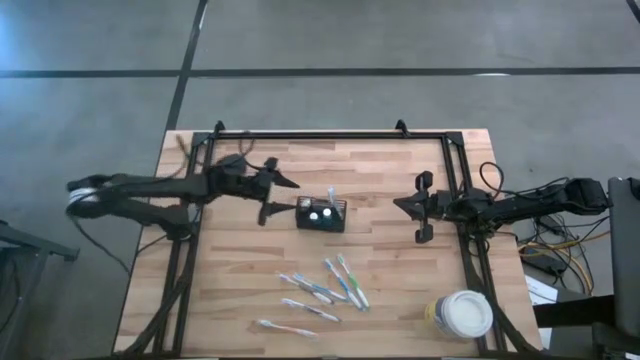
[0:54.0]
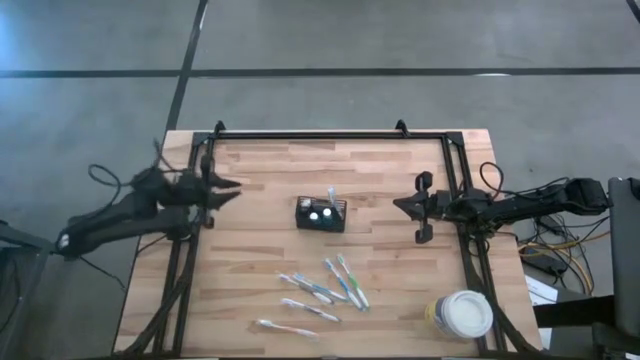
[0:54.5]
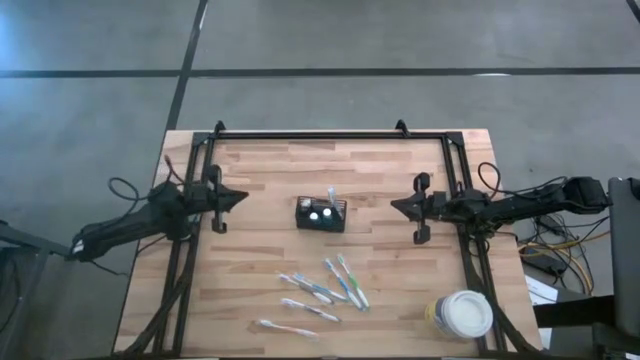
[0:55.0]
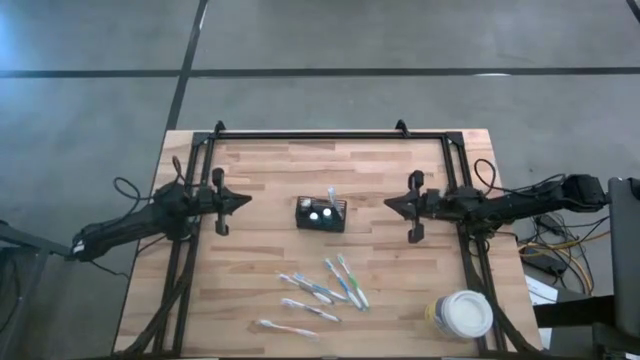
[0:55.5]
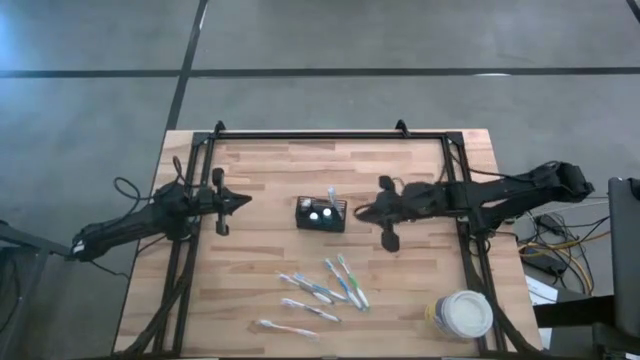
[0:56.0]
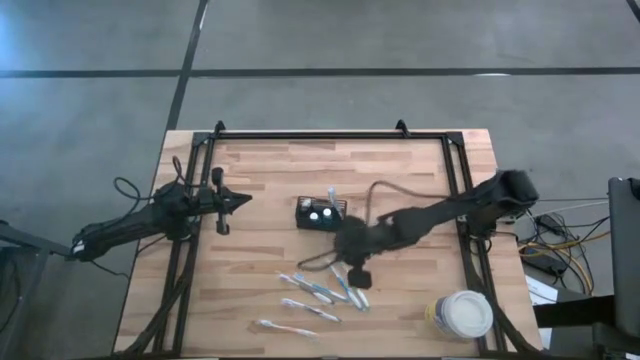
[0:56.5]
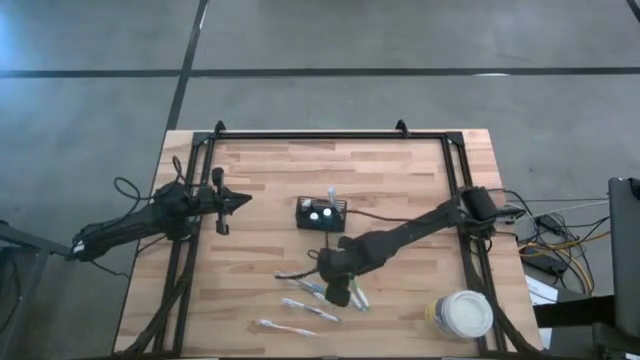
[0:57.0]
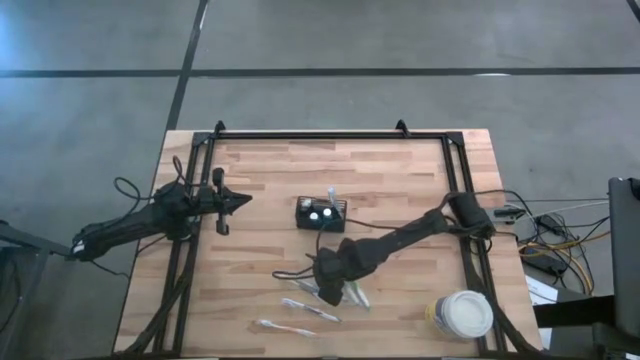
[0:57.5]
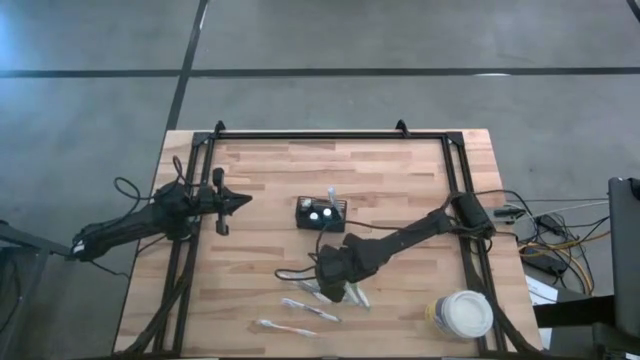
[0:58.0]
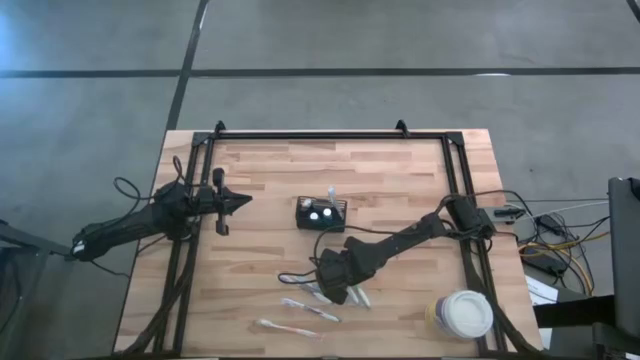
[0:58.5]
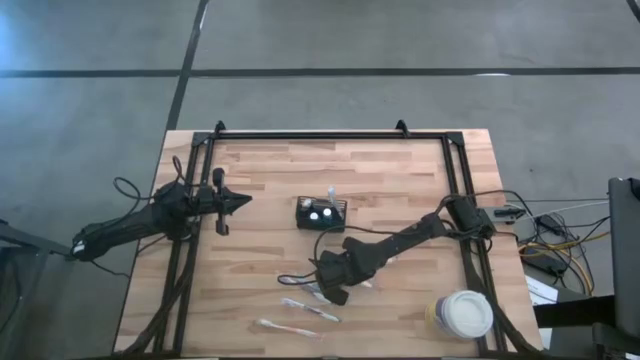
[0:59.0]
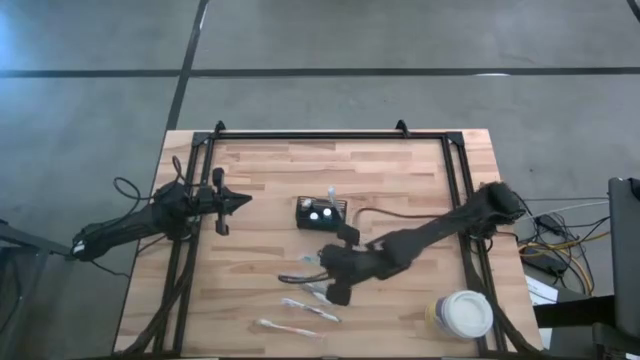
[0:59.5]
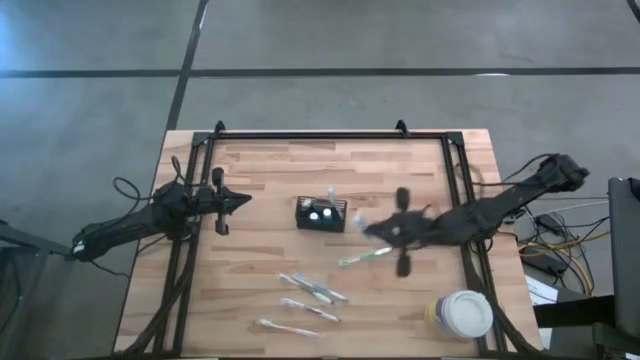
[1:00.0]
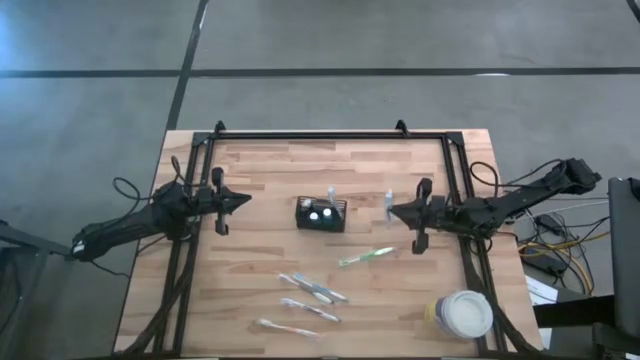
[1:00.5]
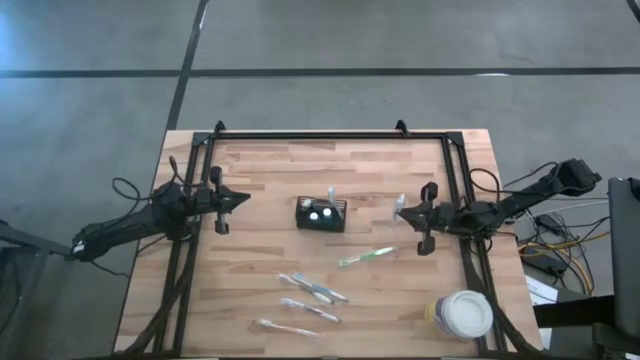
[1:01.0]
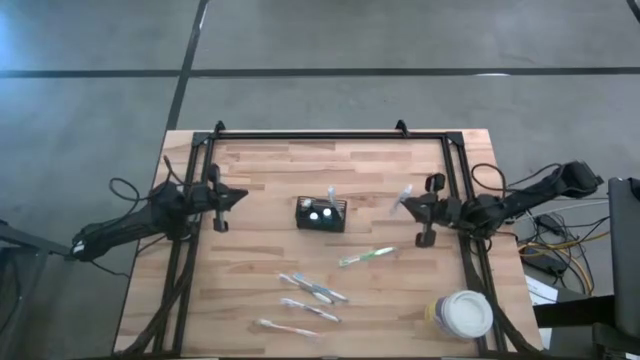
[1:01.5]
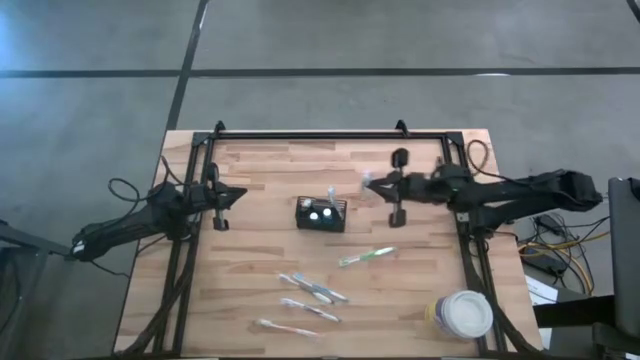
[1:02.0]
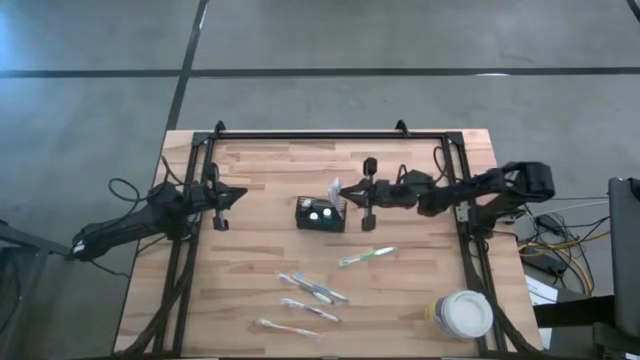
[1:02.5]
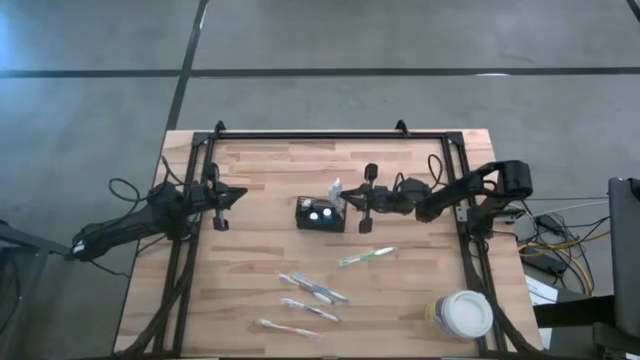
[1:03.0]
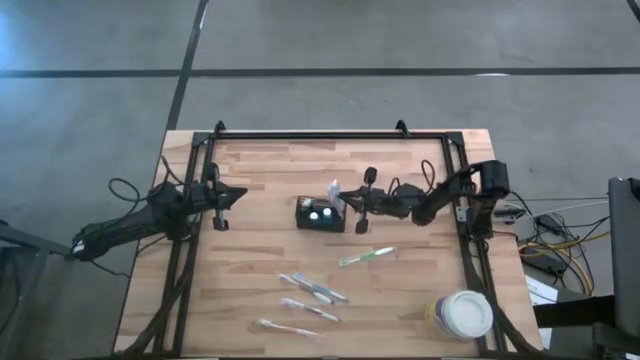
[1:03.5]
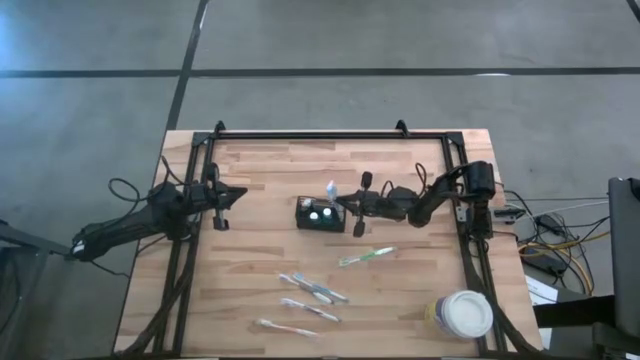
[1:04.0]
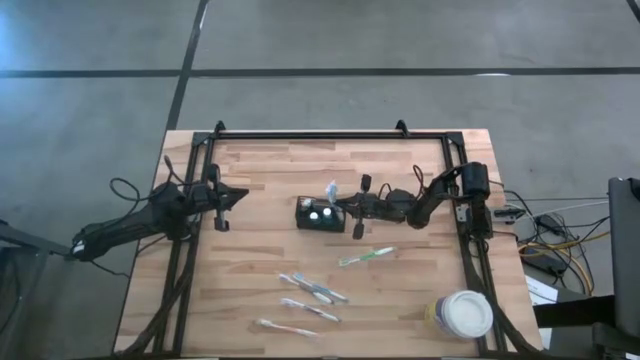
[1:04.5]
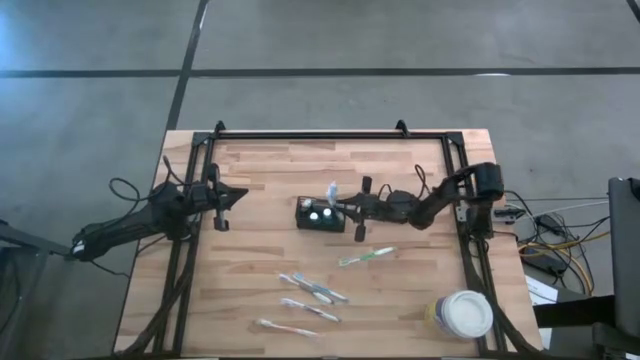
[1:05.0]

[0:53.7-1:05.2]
Task: Pick & Place toothbrushing station
Put the right blue toothbrush into the wire organizer

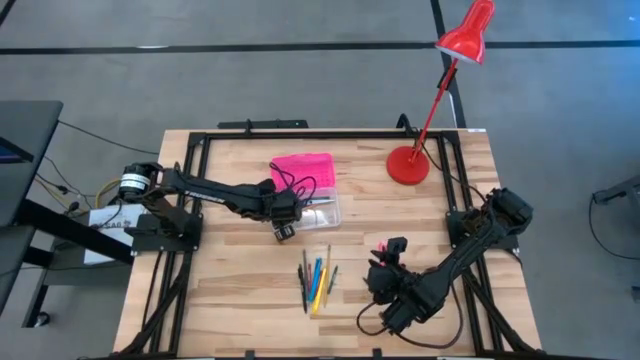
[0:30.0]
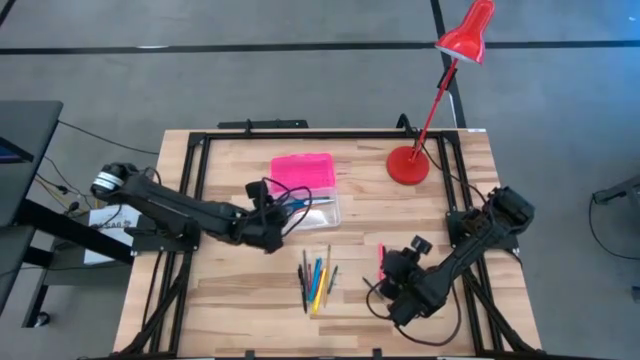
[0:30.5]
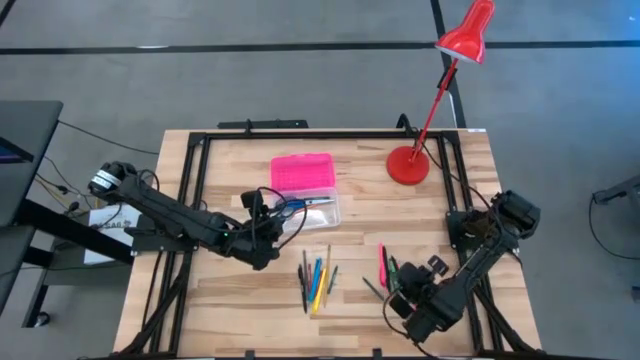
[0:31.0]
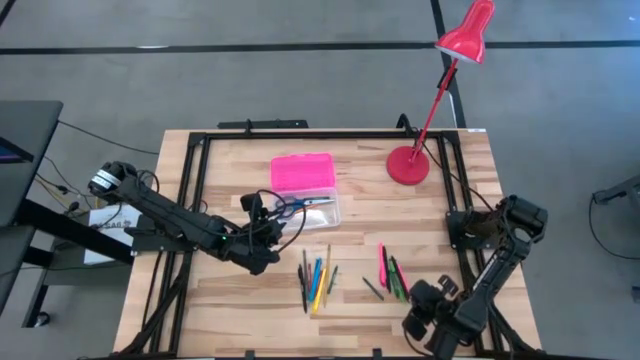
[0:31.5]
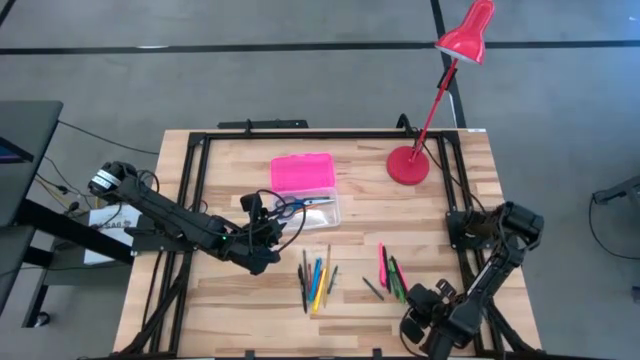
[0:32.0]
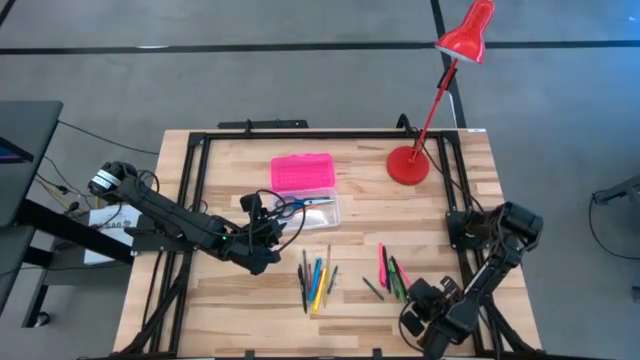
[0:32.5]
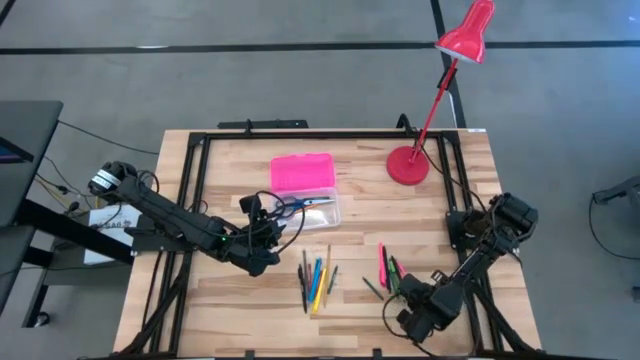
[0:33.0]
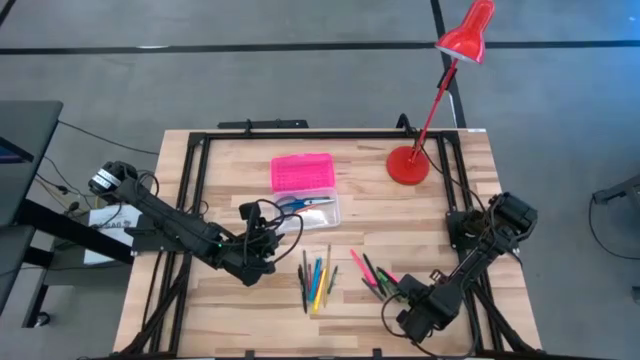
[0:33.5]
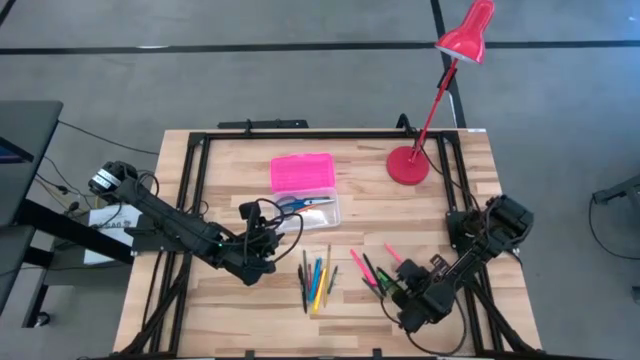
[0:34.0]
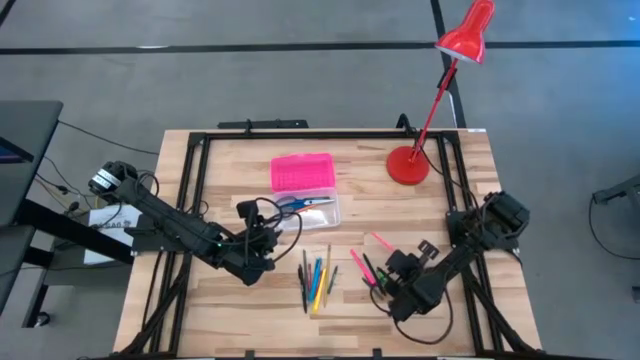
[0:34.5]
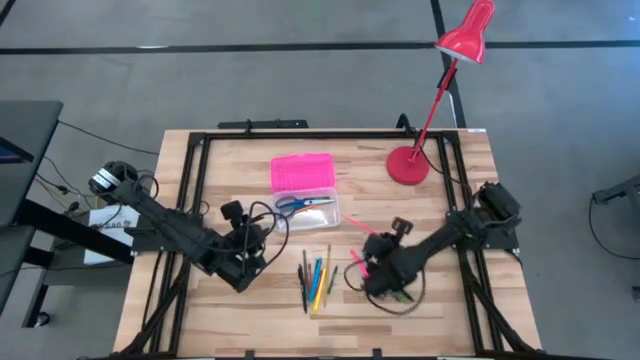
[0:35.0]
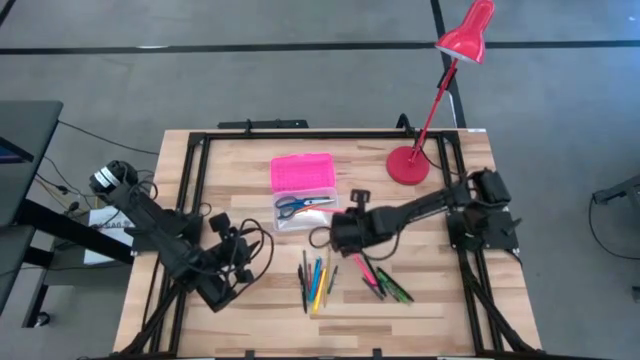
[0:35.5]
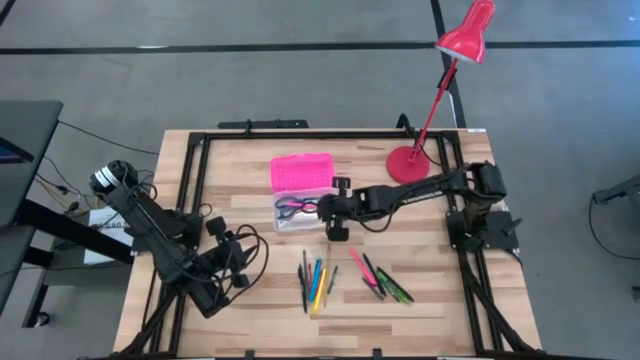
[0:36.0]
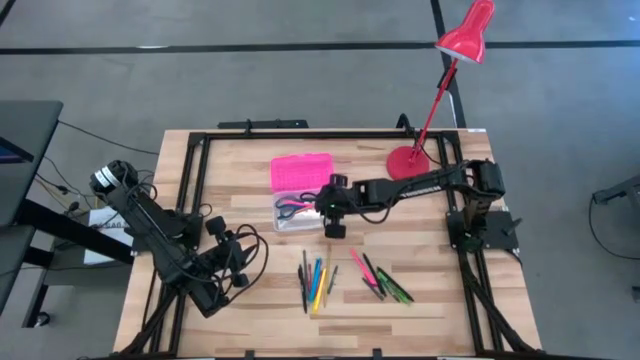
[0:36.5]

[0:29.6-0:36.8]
Task: Pick & place school supplies into a supply box
Put the pink pencil into the pink supply box
